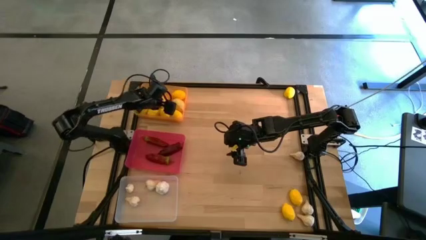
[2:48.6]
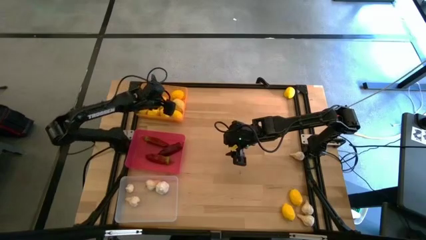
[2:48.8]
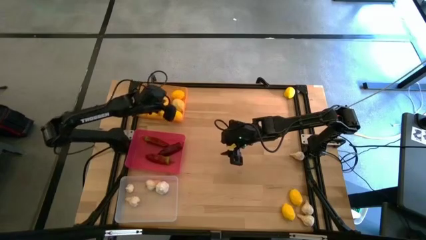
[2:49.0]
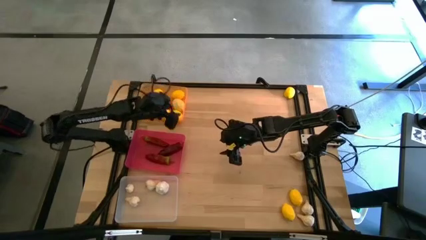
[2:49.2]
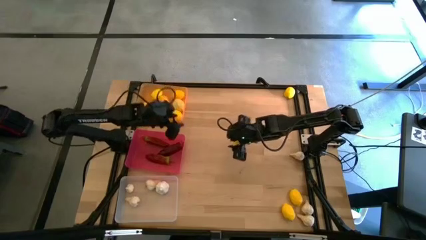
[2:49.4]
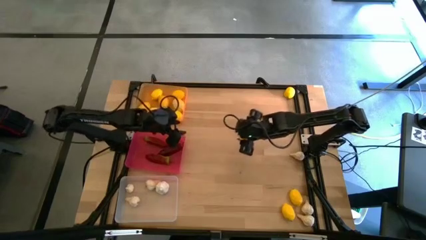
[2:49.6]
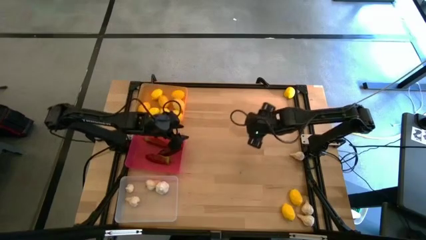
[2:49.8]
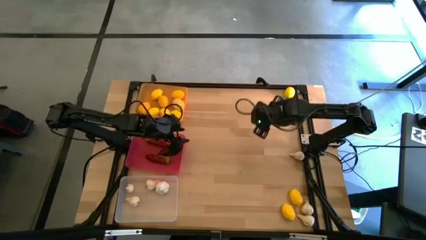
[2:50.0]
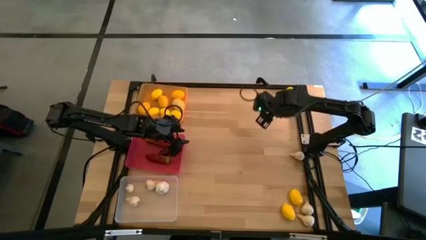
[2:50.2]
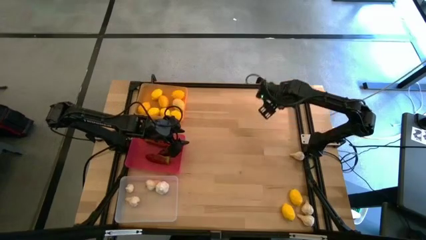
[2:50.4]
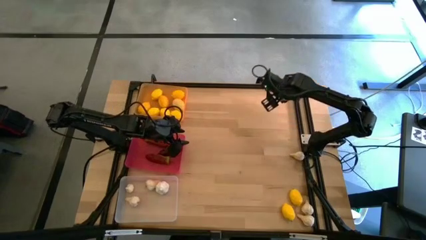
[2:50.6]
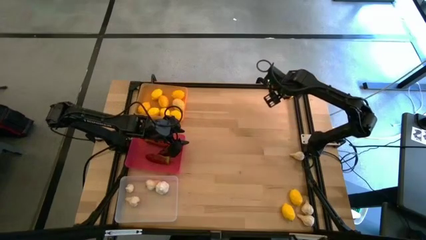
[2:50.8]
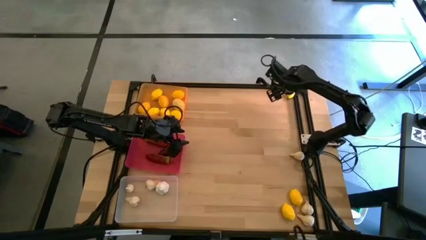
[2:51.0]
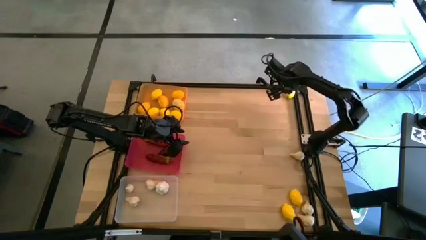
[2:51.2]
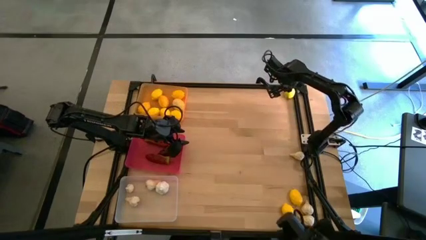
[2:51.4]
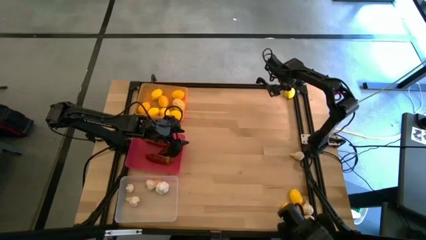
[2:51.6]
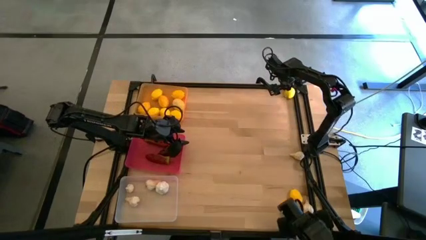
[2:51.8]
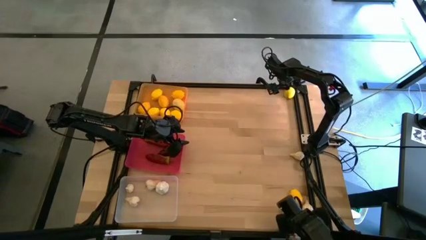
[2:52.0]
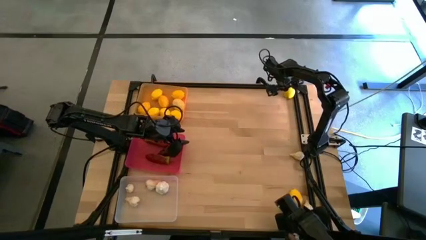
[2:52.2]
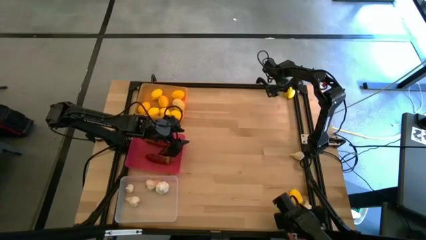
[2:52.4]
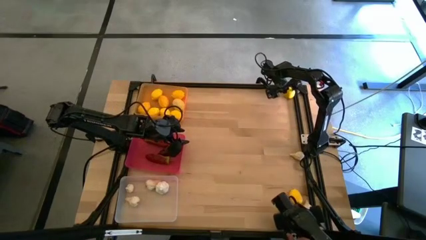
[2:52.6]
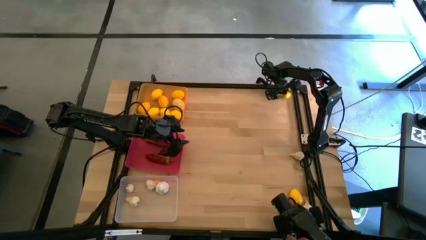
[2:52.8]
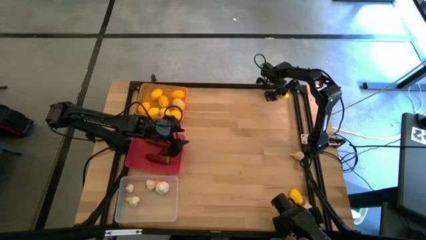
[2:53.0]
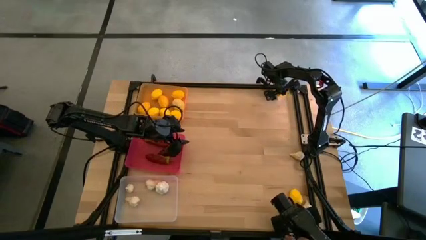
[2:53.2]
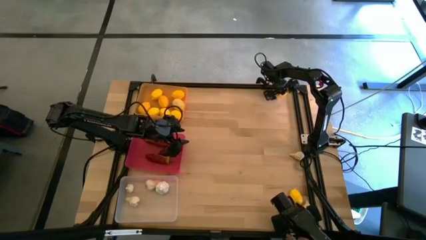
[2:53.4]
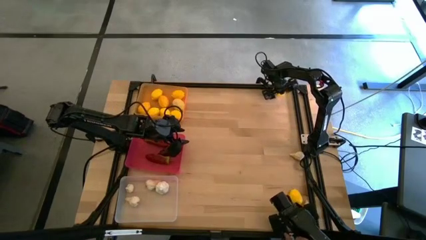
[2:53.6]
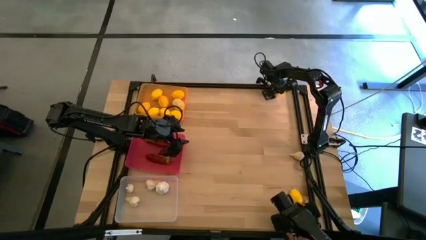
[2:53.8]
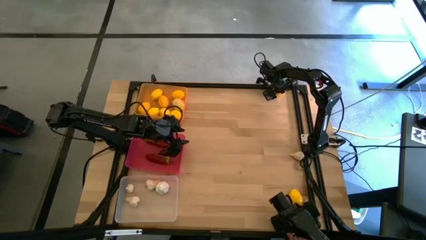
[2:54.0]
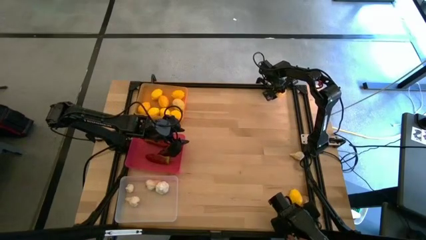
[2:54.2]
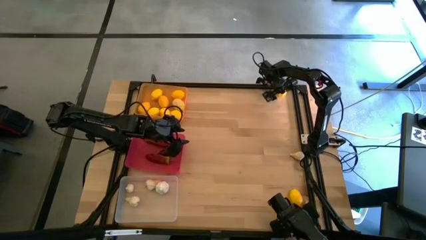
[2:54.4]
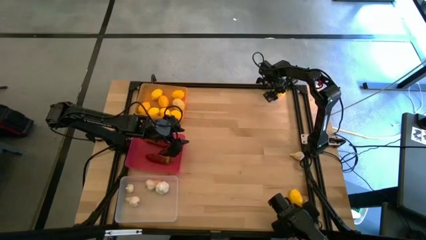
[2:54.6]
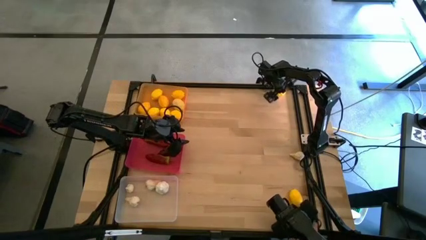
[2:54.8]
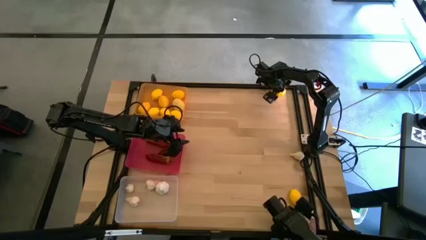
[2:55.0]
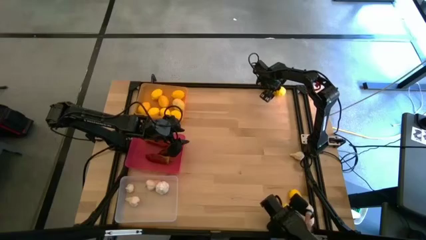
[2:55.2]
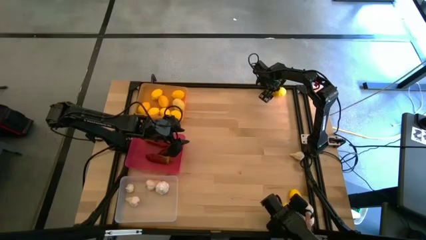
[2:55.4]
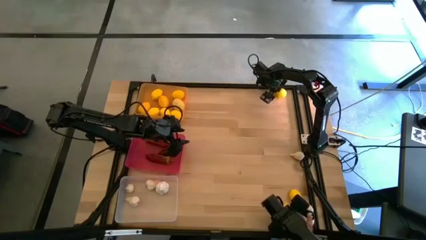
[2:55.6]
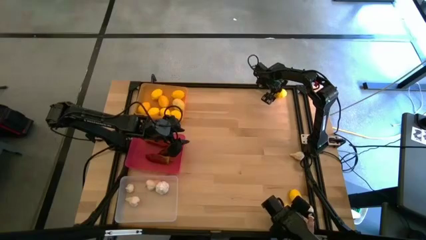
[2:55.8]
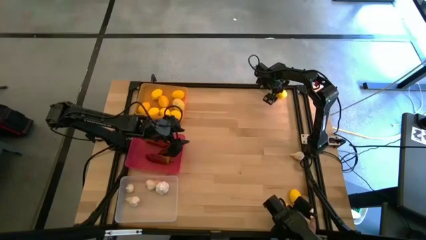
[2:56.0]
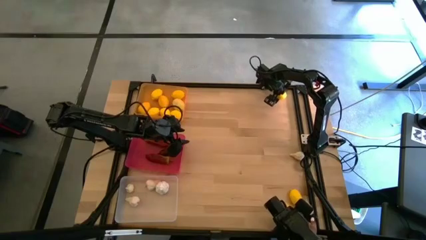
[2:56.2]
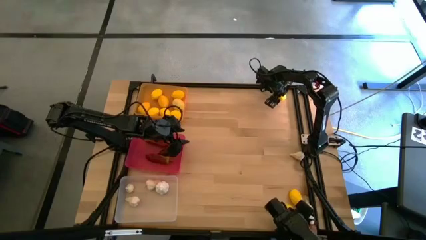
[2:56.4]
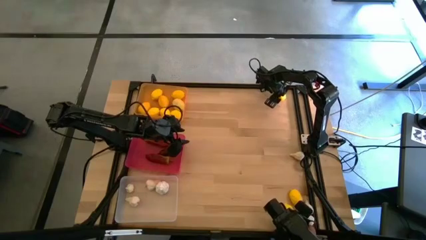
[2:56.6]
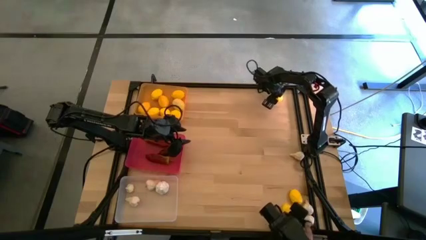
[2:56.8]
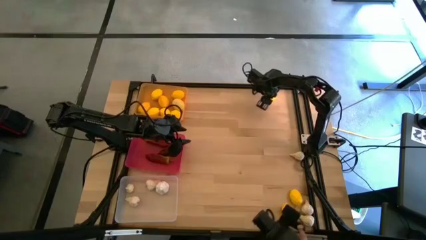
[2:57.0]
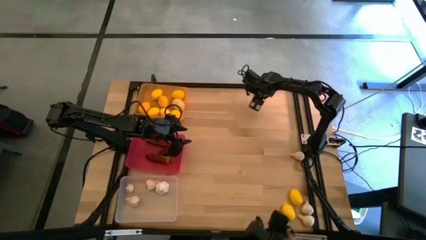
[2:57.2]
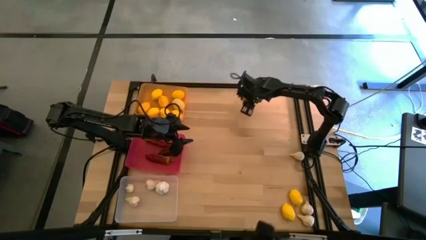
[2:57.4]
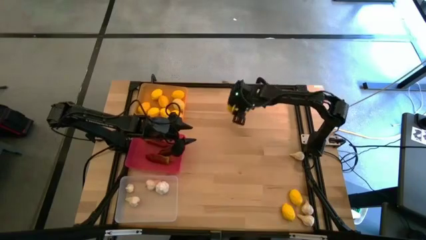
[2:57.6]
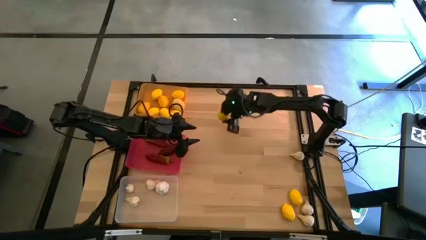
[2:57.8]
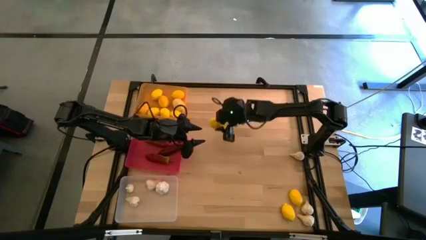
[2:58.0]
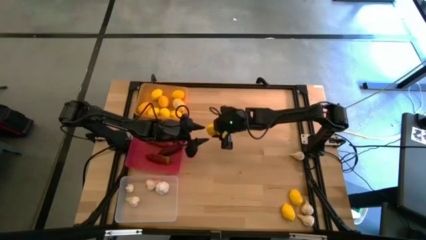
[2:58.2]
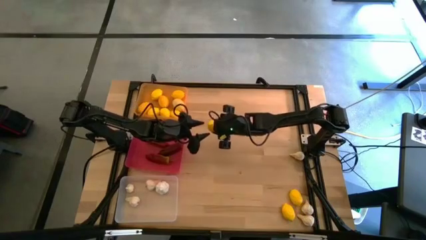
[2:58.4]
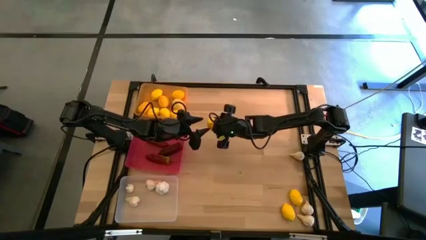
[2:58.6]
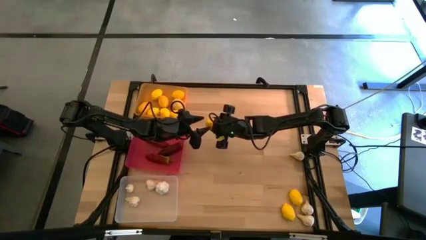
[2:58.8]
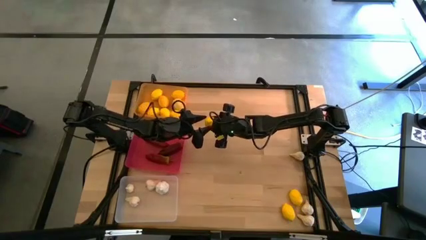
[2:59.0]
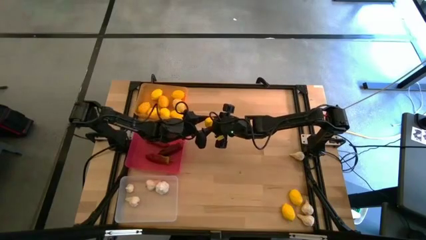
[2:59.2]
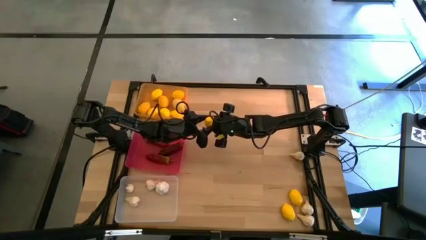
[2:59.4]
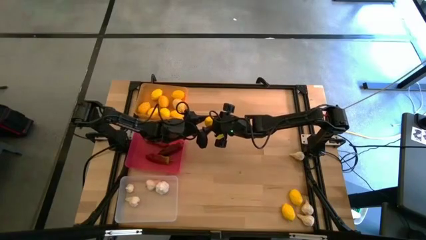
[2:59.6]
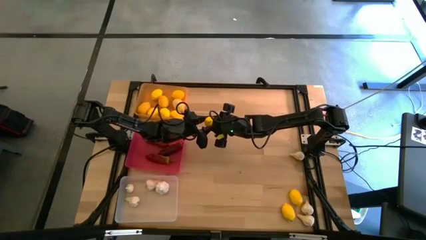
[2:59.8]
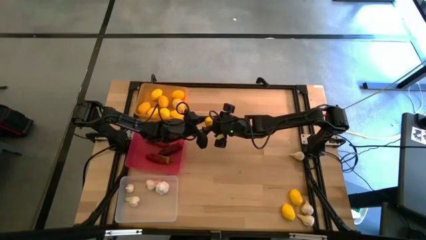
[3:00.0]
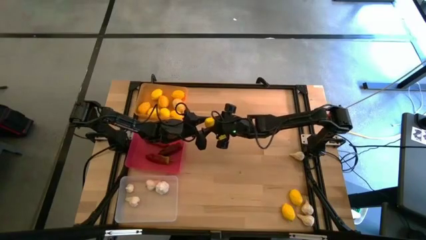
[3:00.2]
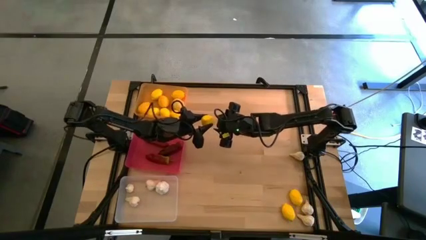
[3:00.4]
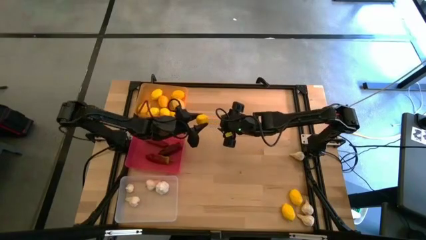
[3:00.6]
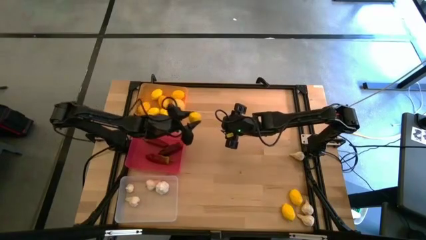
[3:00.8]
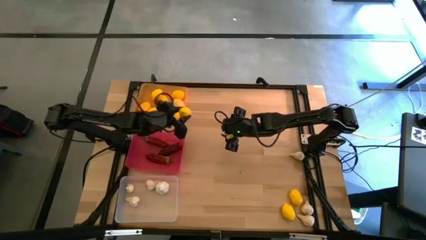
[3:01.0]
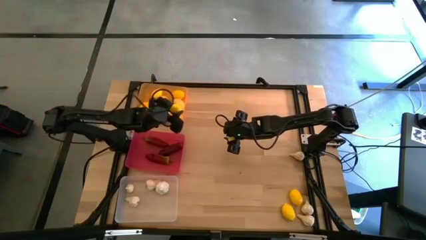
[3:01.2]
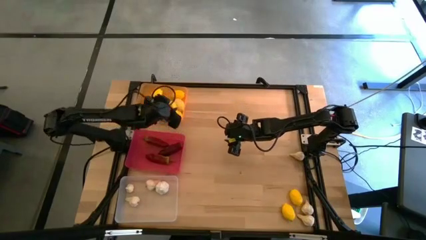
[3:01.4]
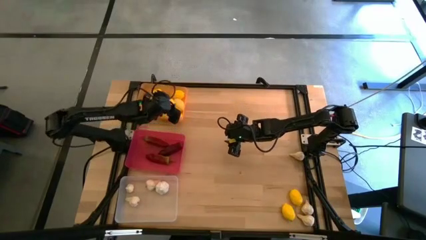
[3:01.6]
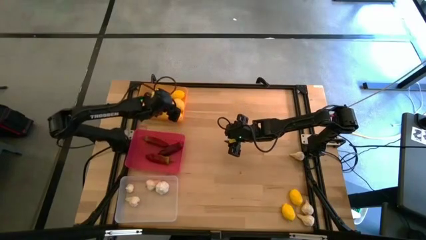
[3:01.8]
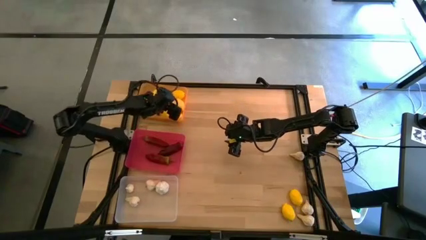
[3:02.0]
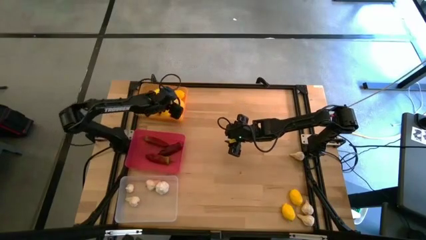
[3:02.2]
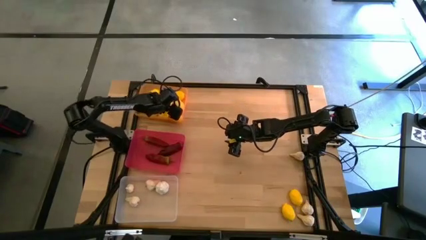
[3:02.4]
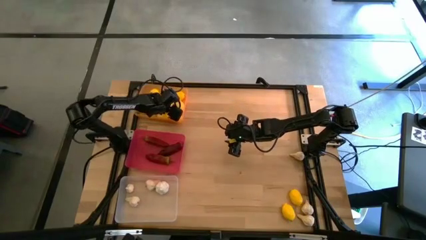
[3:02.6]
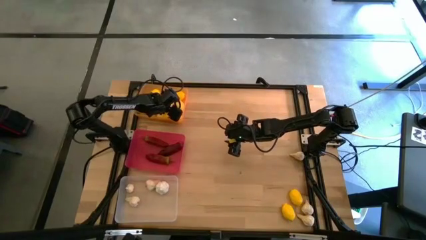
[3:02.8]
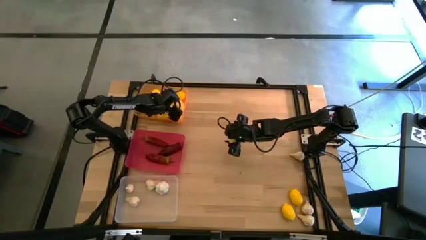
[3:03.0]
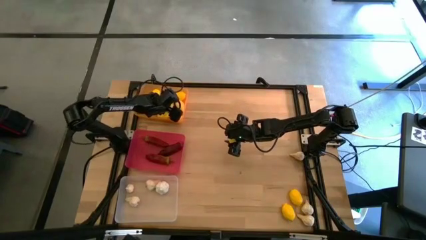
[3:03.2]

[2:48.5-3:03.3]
Task: Sort produce into baskets
Put the lemon into the yellow bin

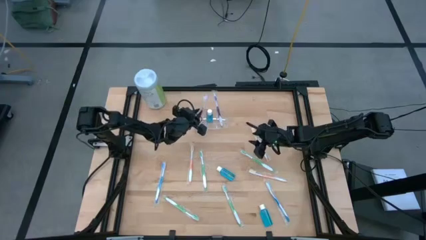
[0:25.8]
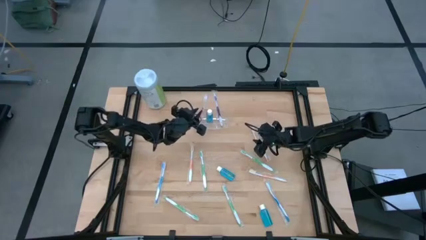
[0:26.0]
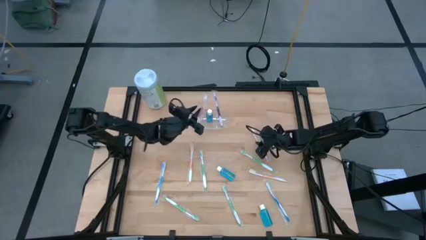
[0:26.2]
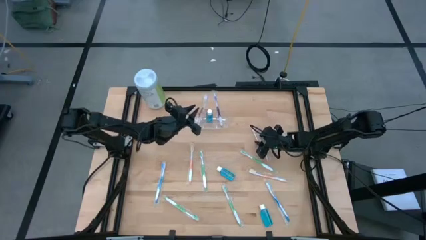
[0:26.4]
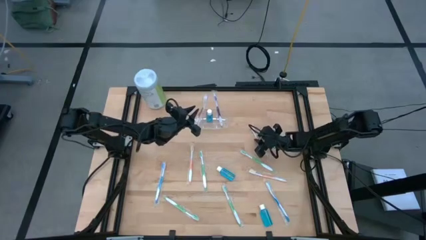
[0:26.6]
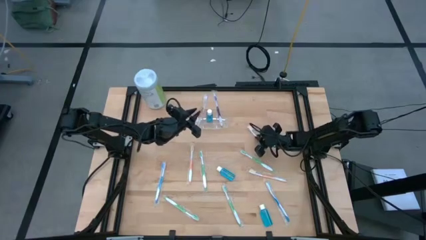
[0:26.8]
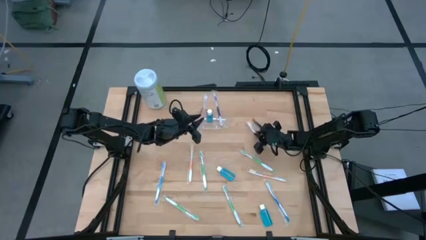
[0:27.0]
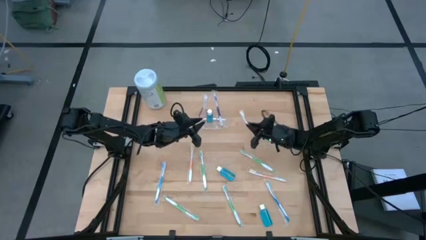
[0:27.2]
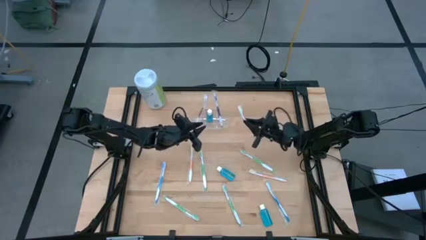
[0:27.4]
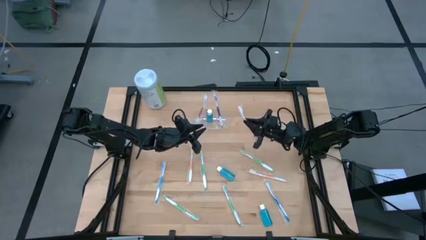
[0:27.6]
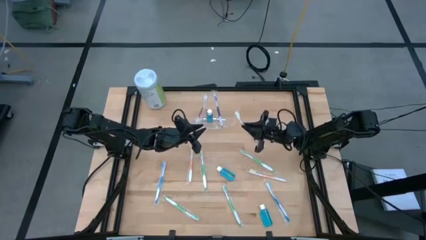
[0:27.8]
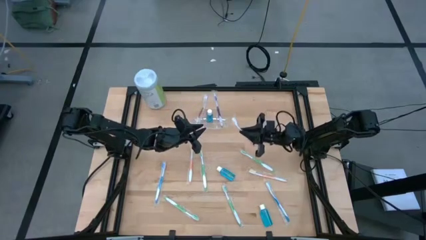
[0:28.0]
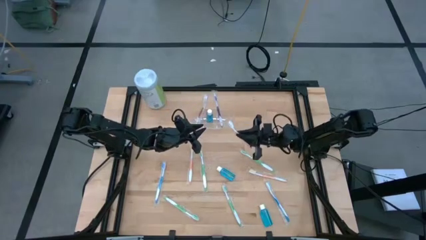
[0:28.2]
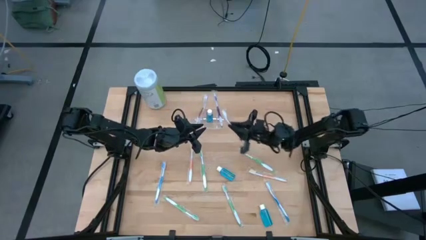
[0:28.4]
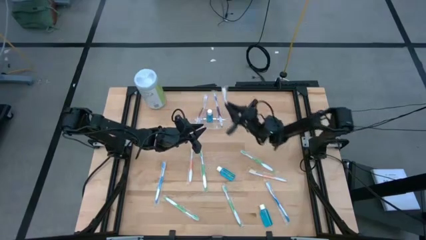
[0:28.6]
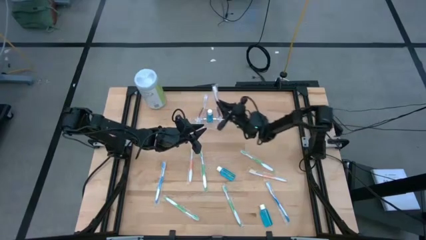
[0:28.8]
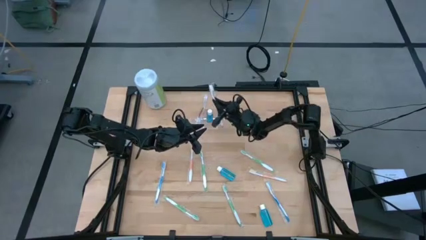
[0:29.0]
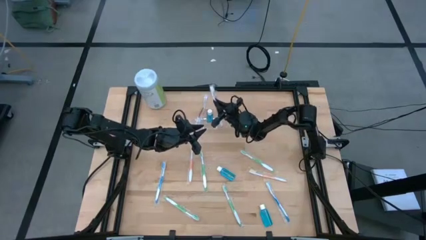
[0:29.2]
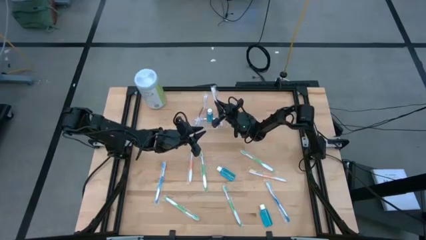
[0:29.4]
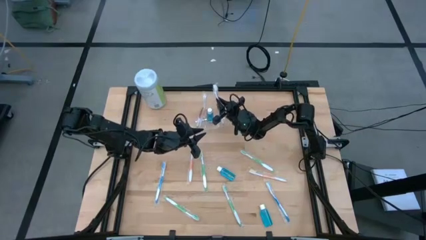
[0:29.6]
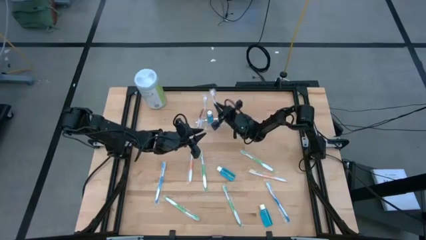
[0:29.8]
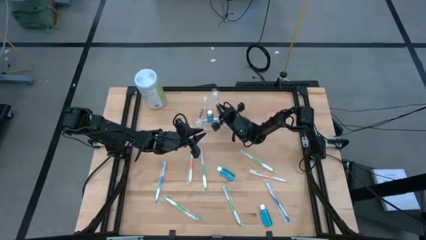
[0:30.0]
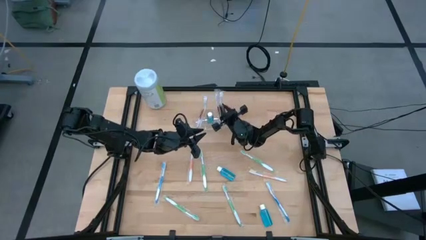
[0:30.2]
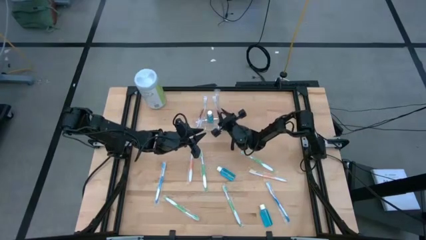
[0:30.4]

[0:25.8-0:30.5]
Task: Pick & Place toothbrushing station
Put the orange toothbrush to the right of the transparent organizer
